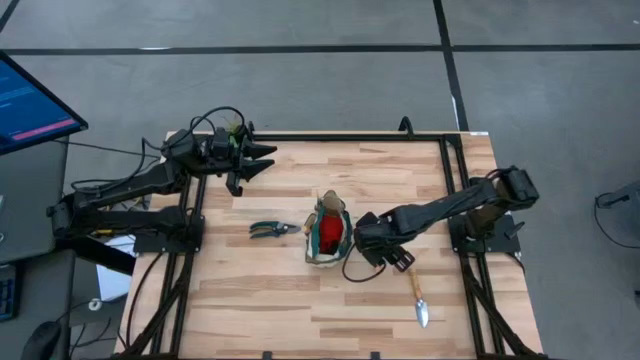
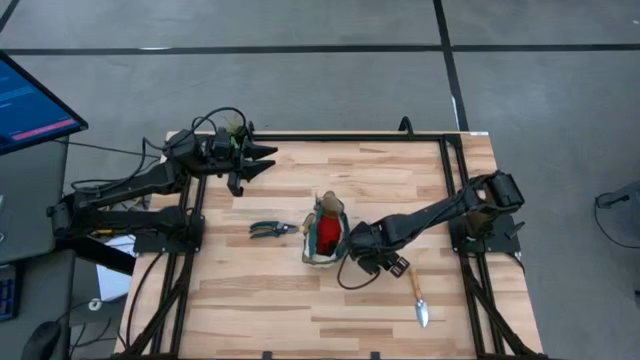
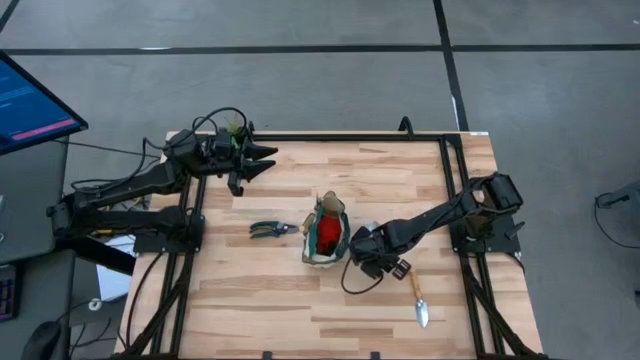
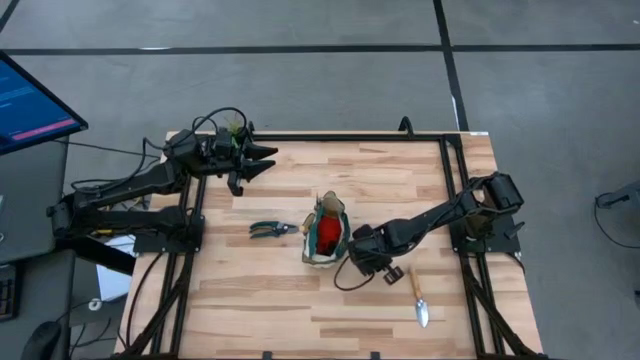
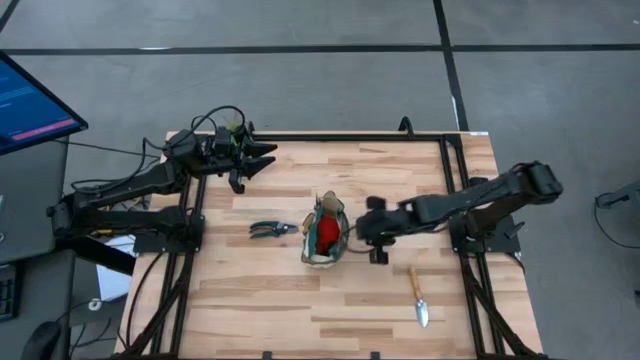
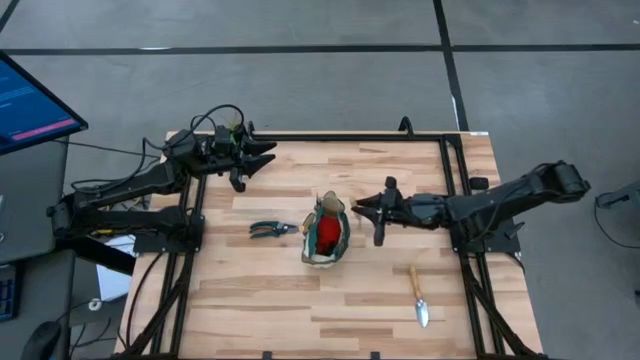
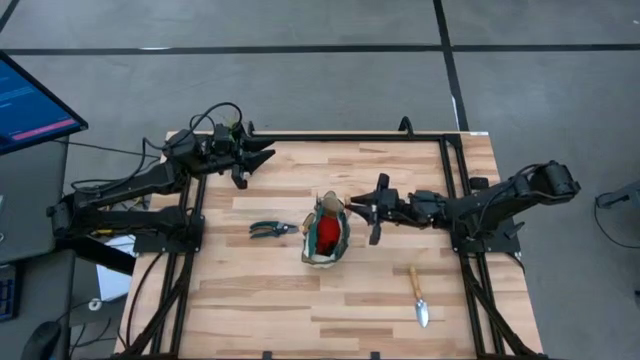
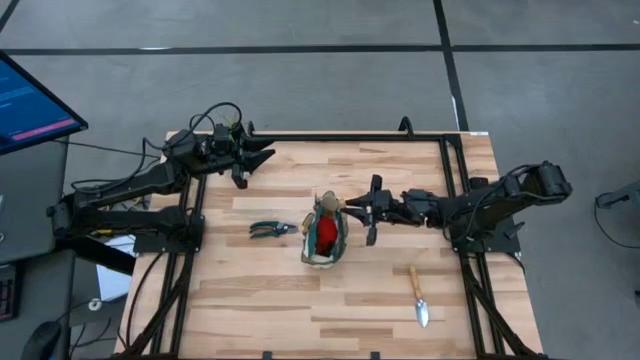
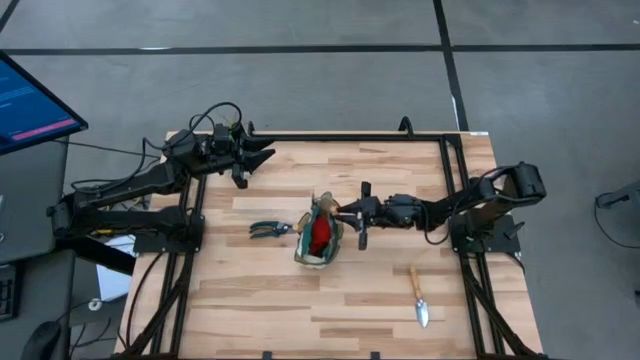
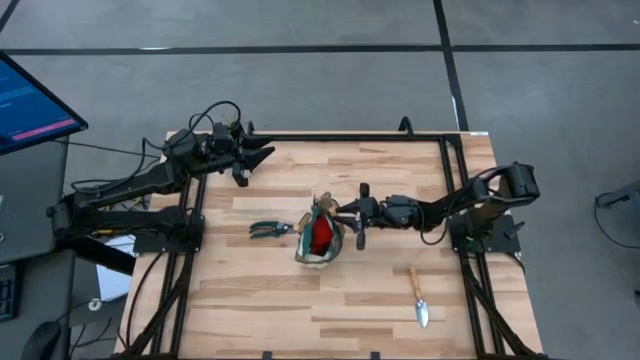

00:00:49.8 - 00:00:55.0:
Task: Pick & Place Garden tools in Gardening bag
Put the trowel into the gardening bag

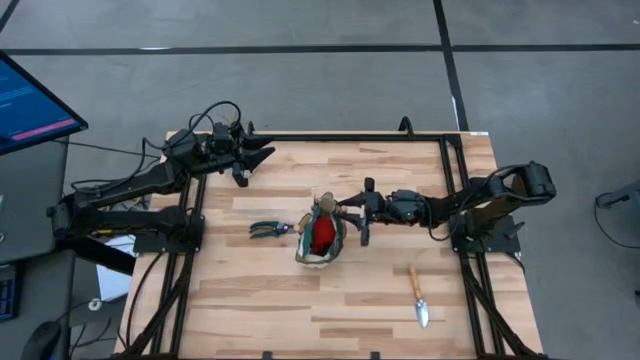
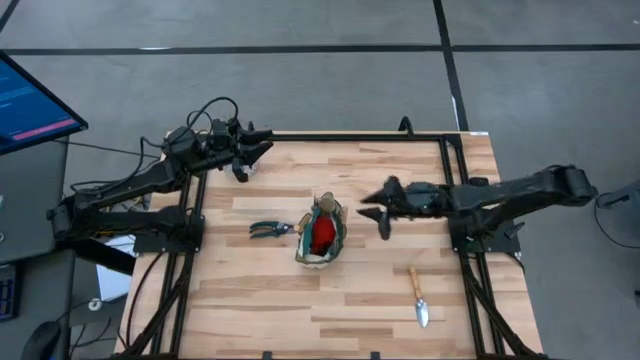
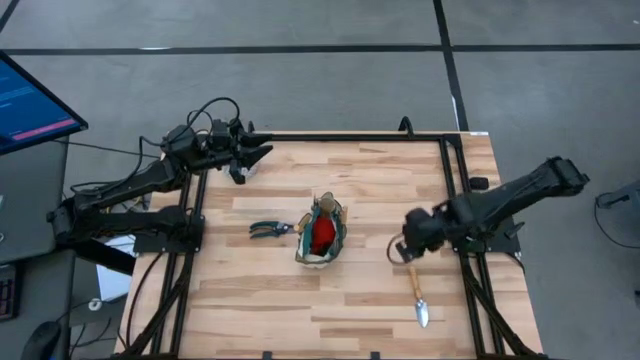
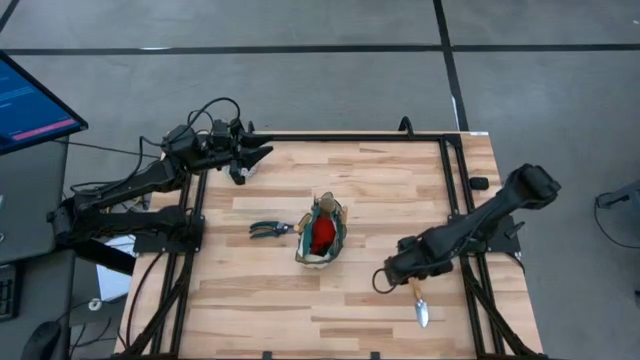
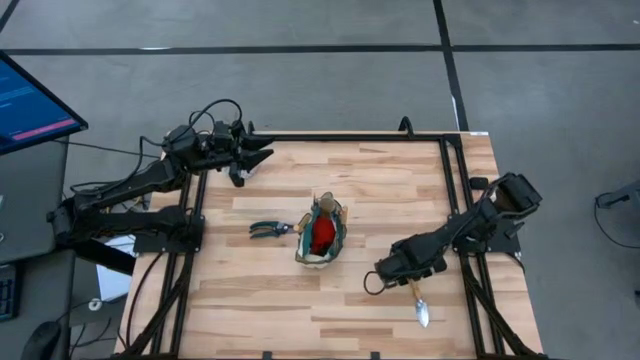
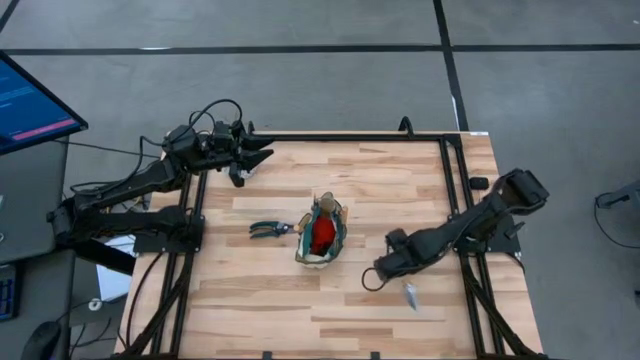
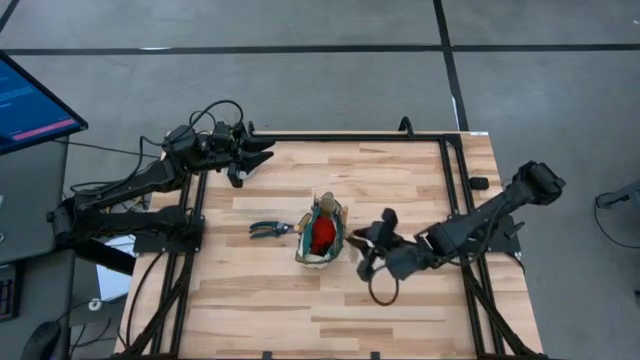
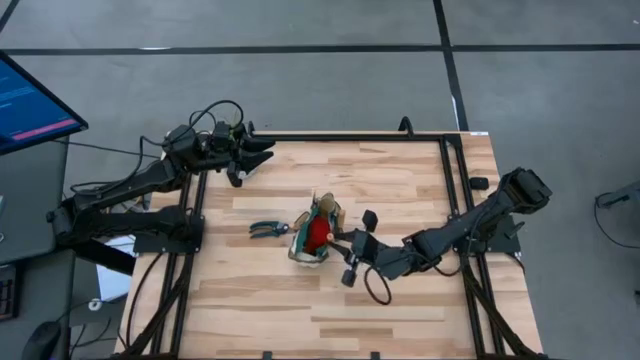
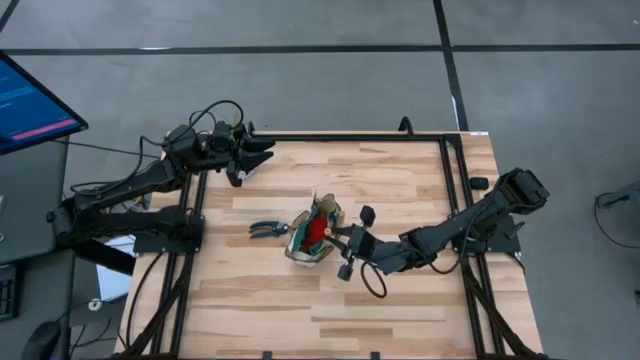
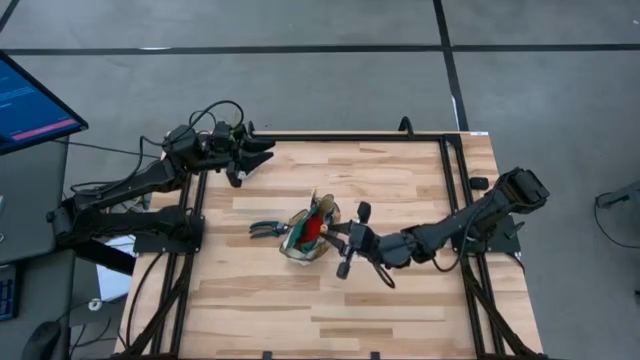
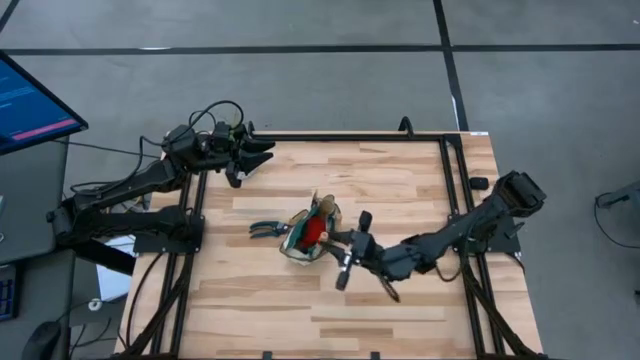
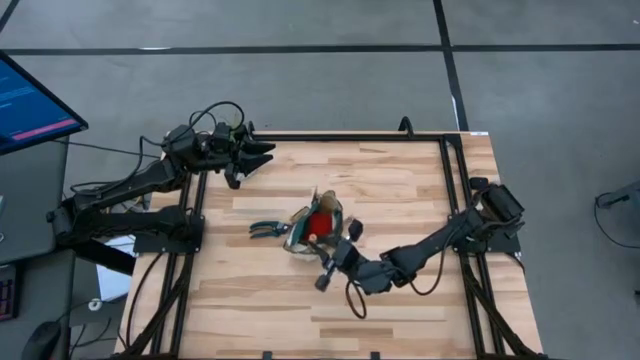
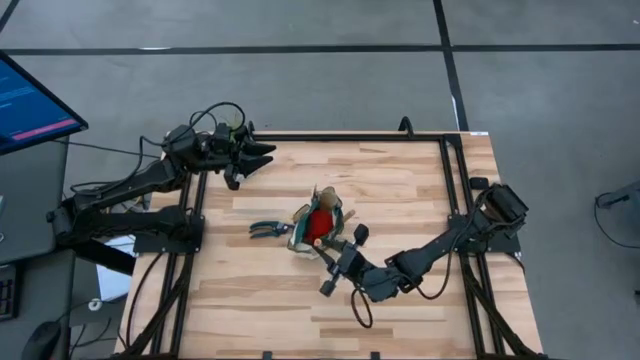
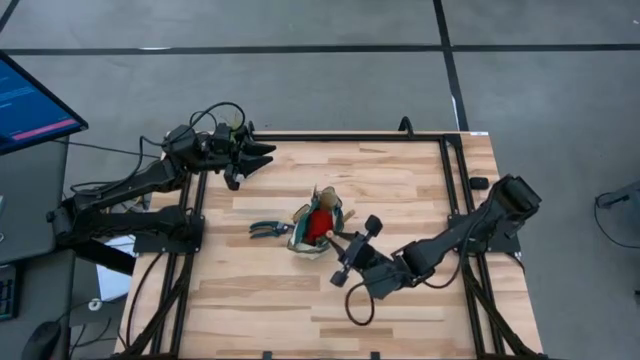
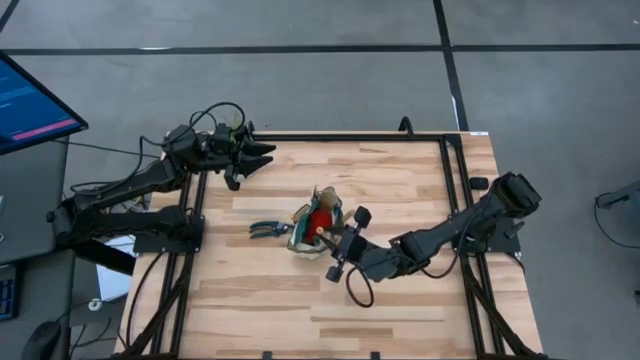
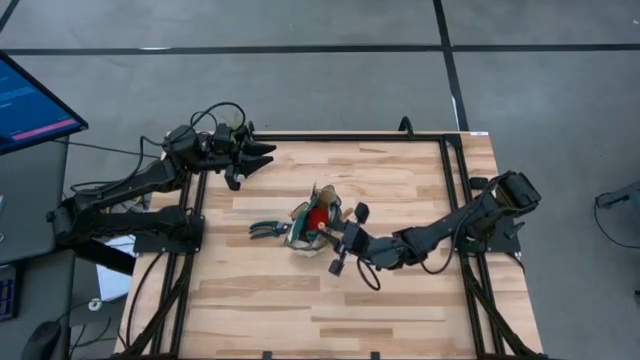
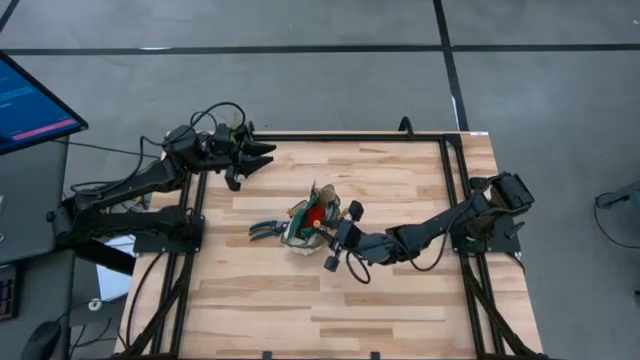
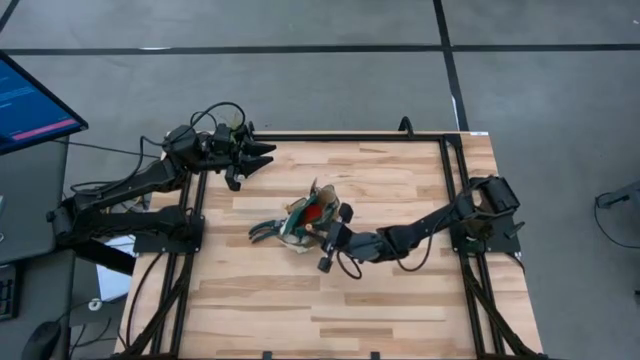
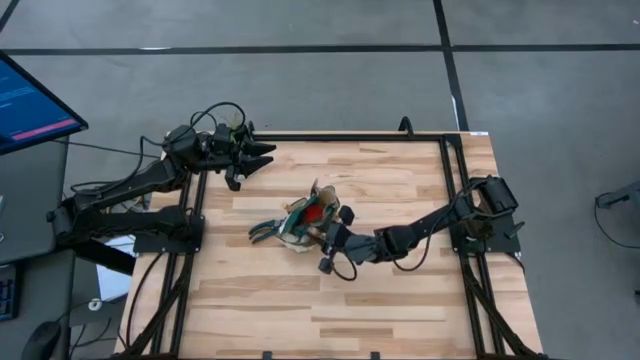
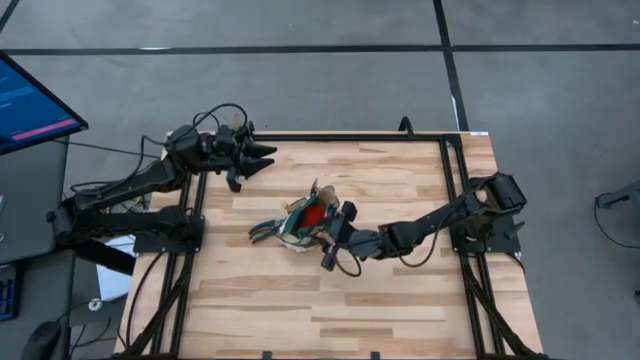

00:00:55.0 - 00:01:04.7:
Put the trowel into the gardening bag
